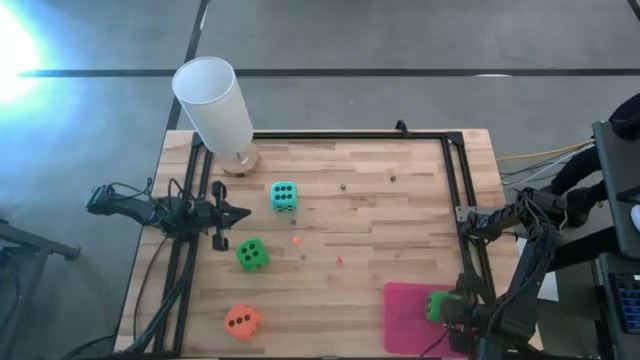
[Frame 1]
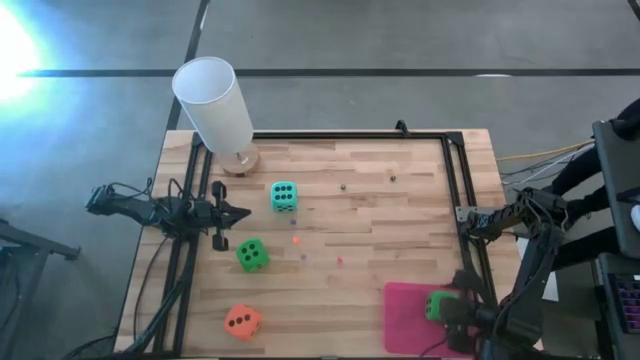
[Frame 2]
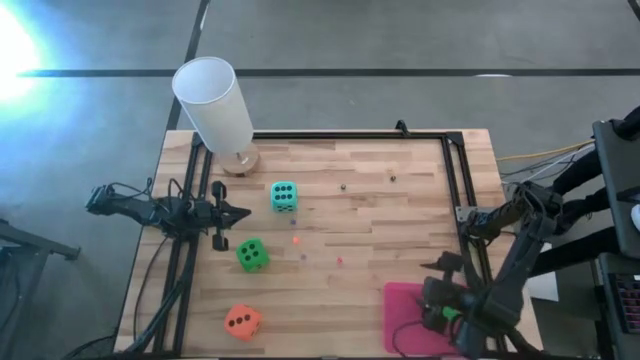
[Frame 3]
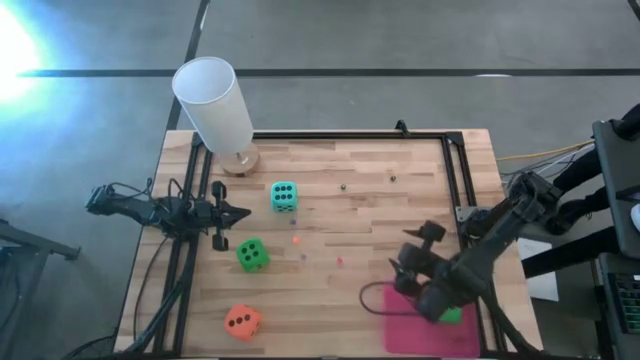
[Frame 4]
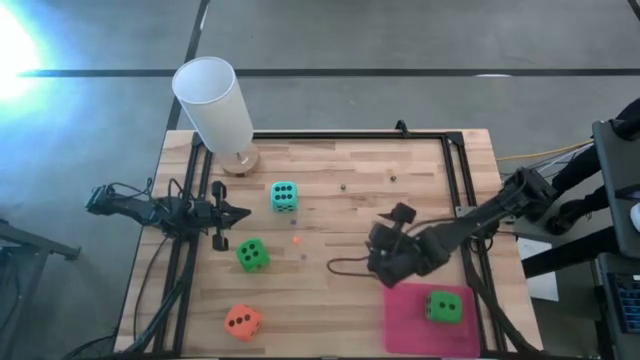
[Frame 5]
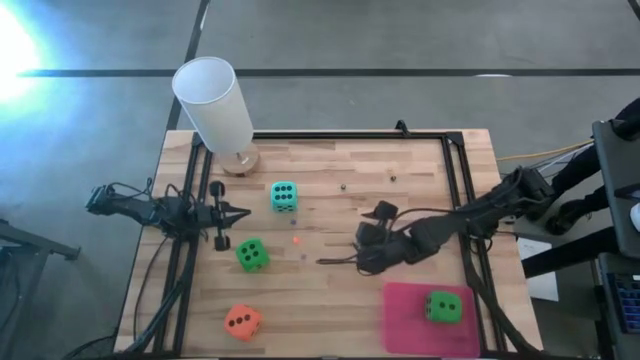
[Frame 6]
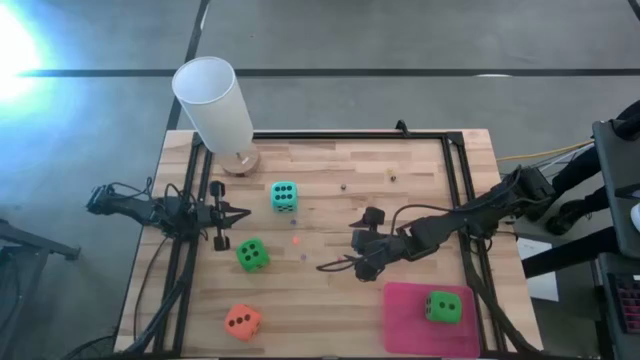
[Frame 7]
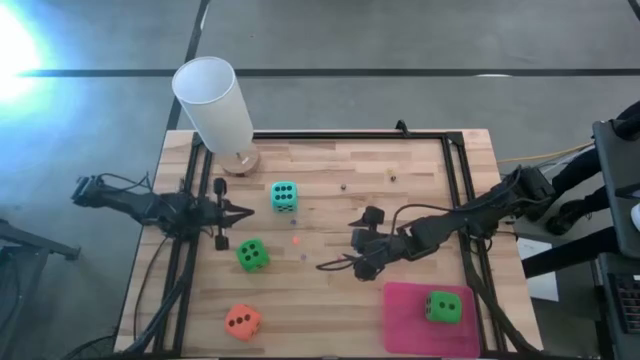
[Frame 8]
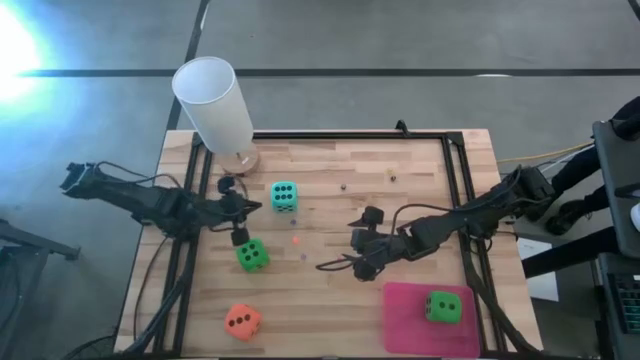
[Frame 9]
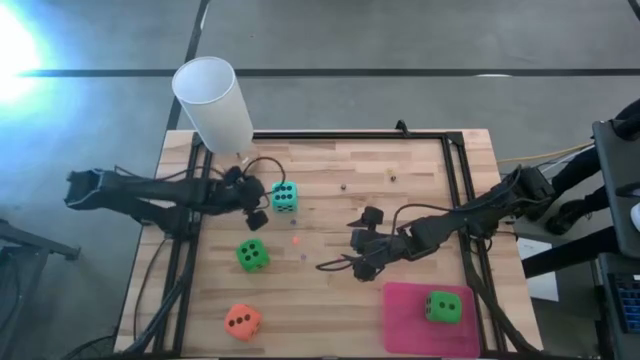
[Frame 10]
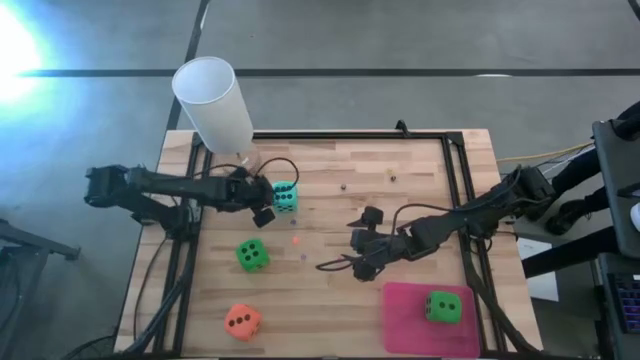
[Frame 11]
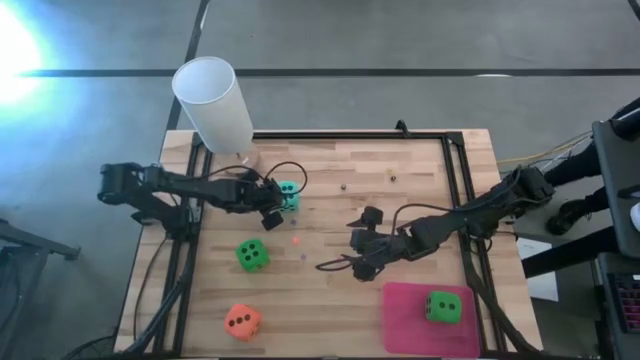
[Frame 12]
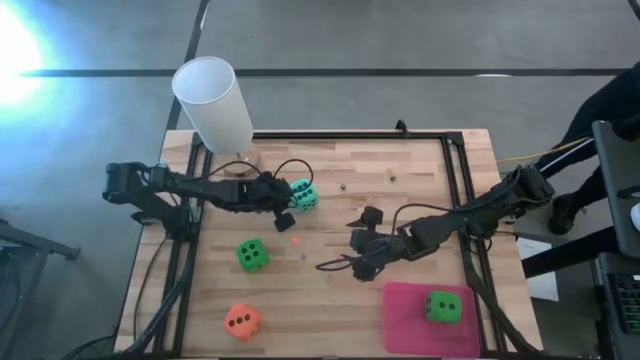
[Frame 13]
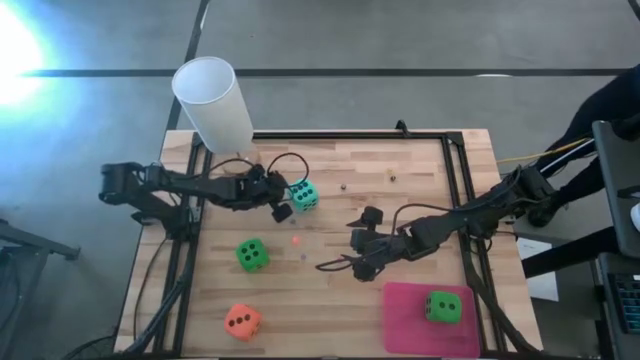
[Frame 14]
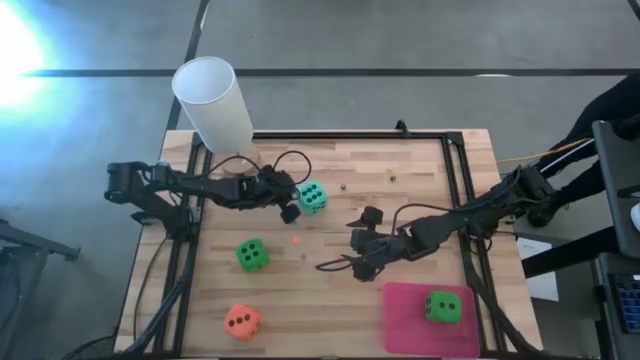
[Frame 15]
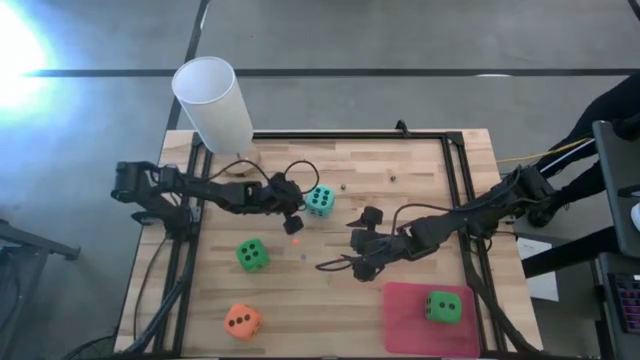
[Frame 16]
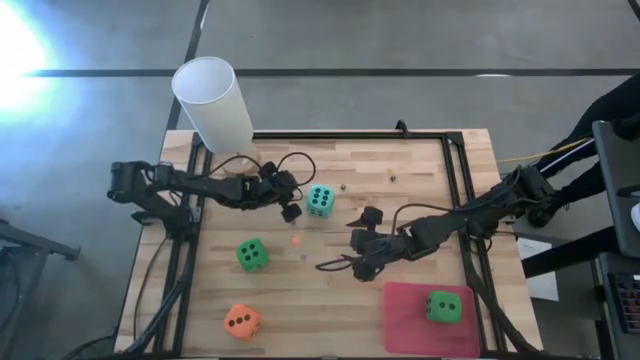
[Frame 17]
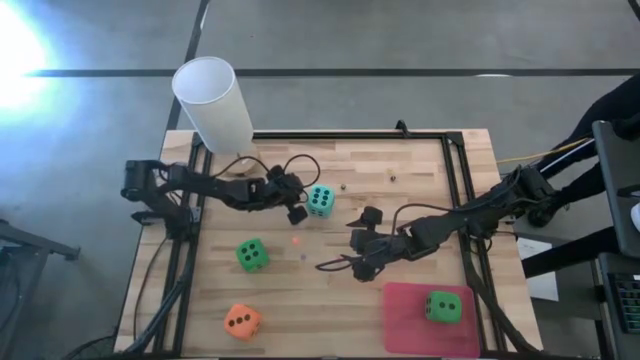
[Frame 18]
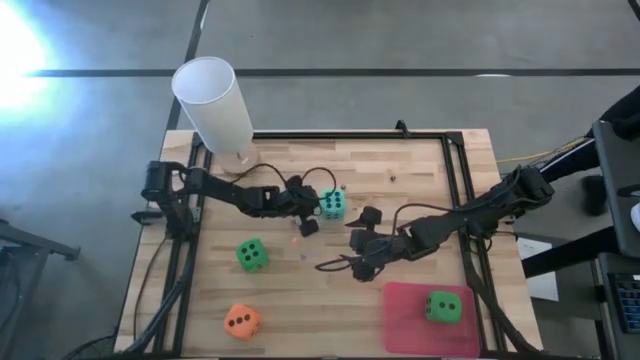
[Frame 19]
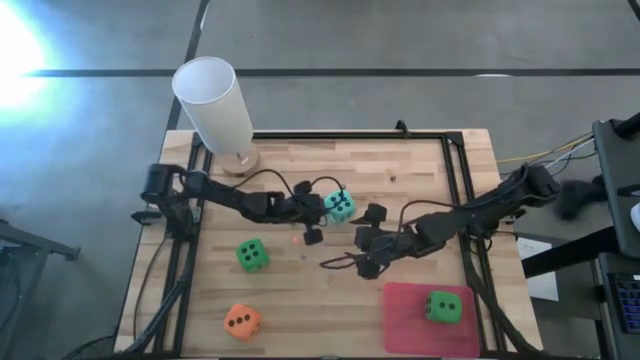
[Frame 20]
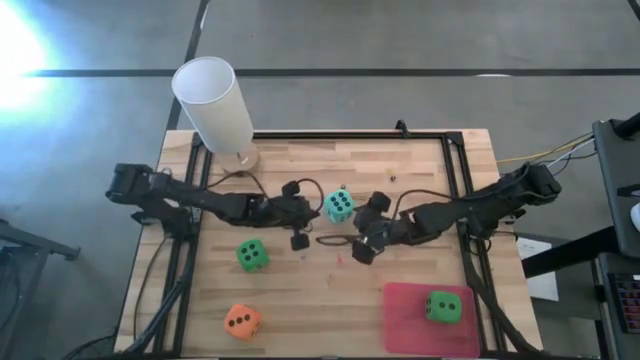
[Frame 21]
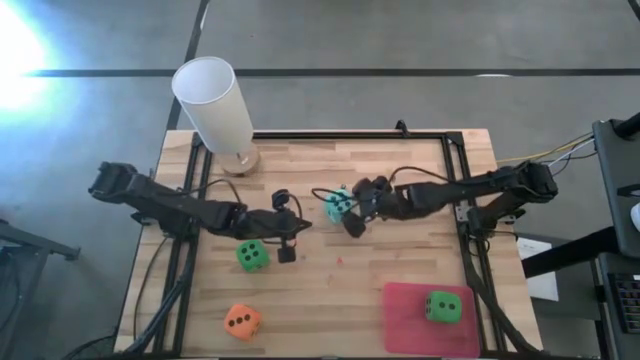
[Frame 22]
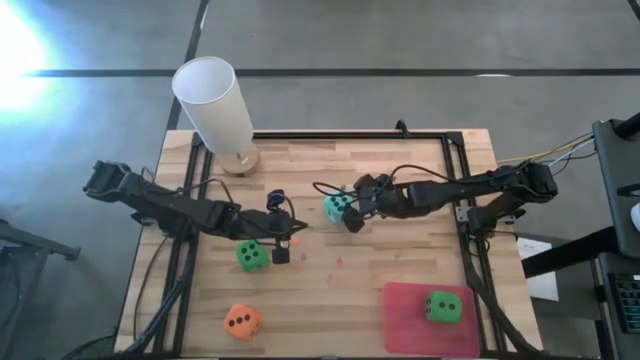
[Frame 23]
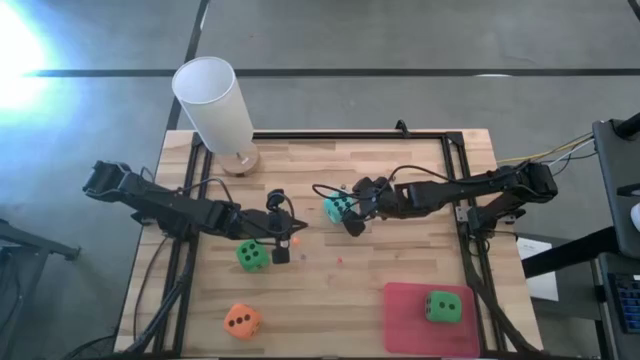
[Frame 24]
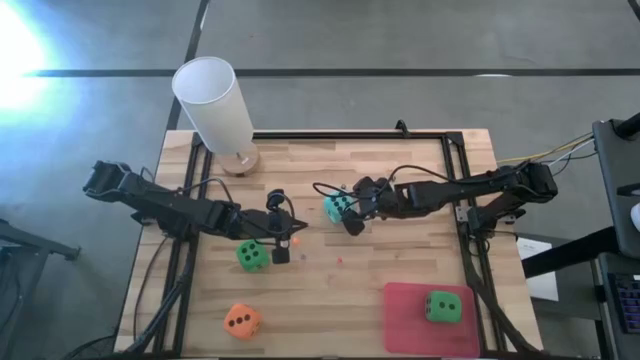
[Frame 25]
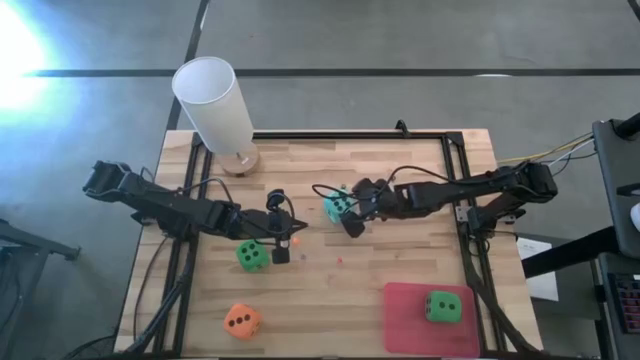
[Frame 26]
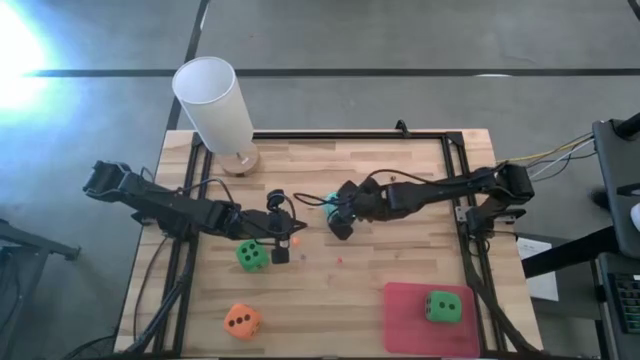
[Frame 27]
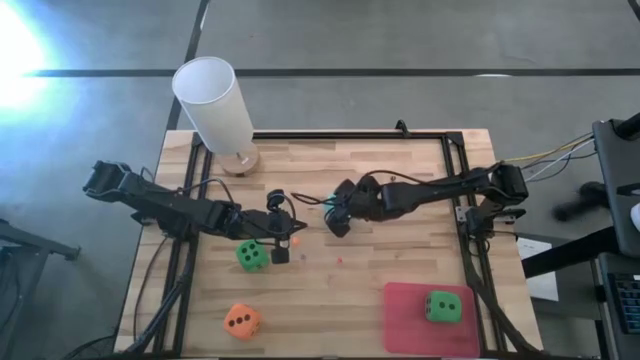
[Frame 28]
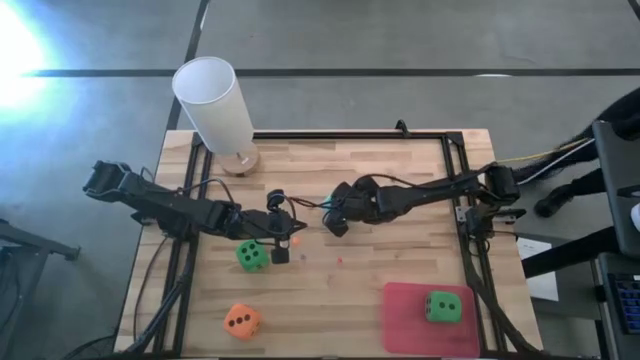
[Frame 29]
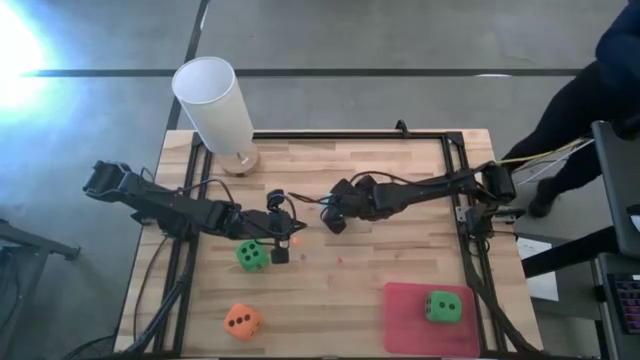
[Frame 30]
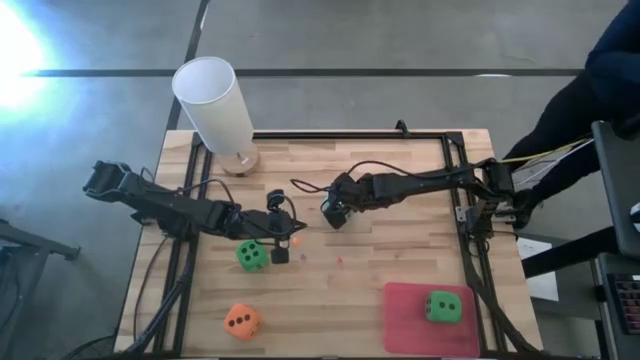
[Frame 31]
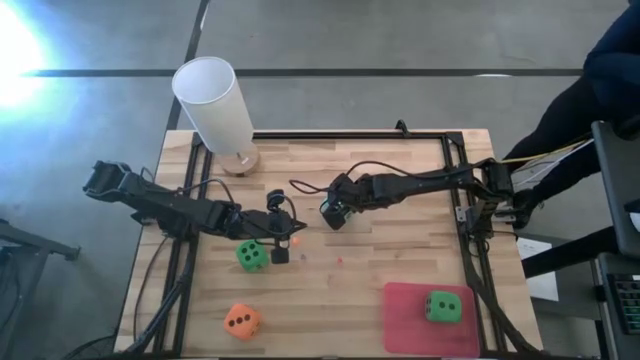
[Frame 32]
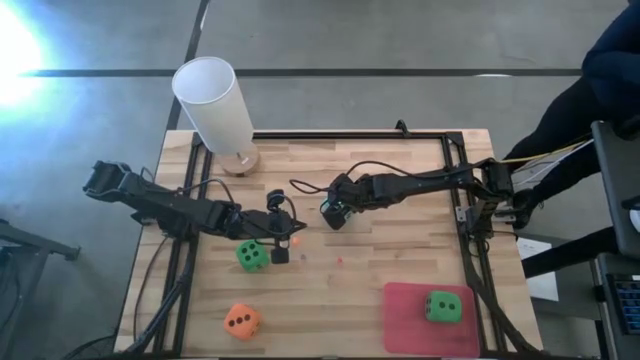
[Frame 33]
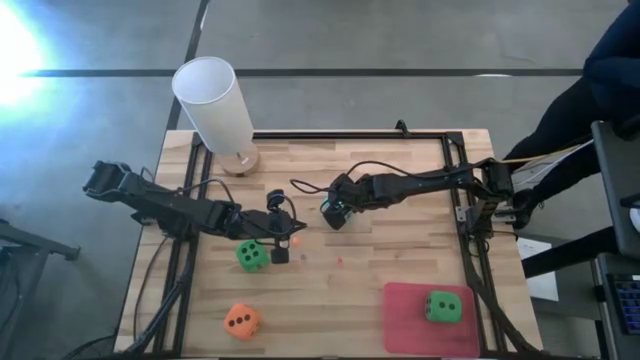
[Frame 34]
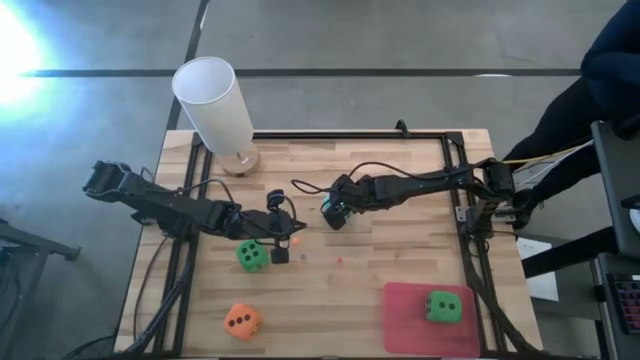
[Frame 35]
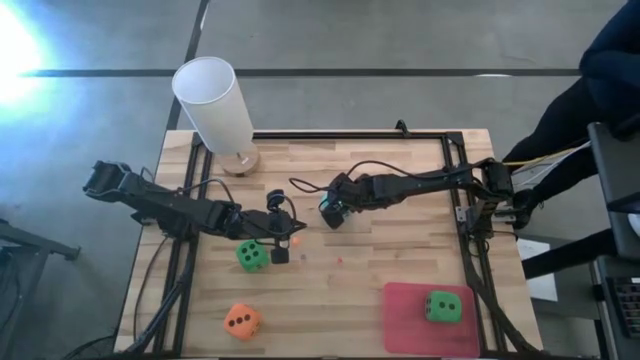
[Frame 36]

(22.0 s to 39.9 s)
Task: Pick & Place Dice
Put the large blue die into the bin
